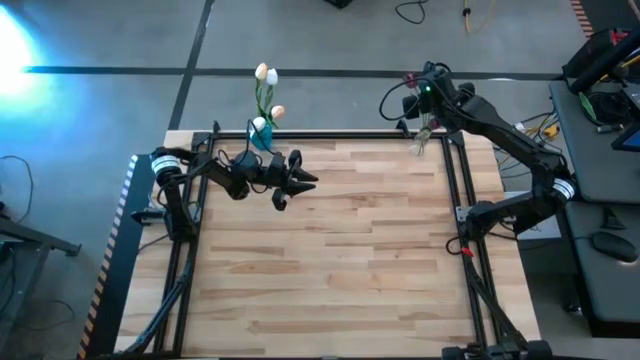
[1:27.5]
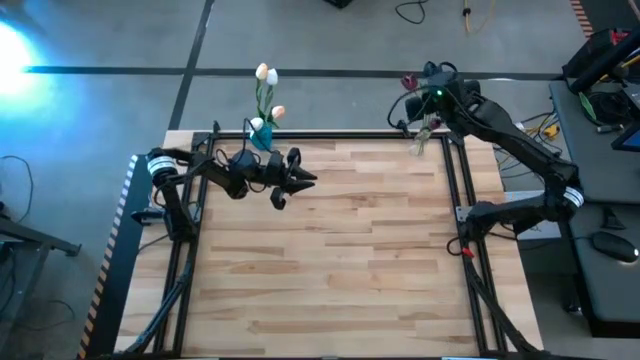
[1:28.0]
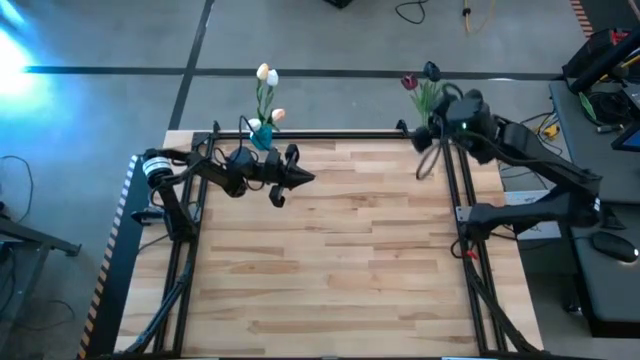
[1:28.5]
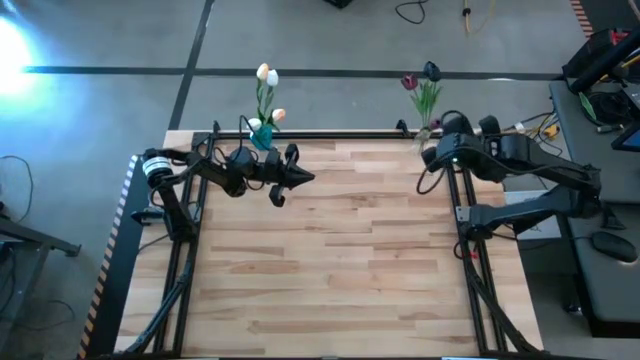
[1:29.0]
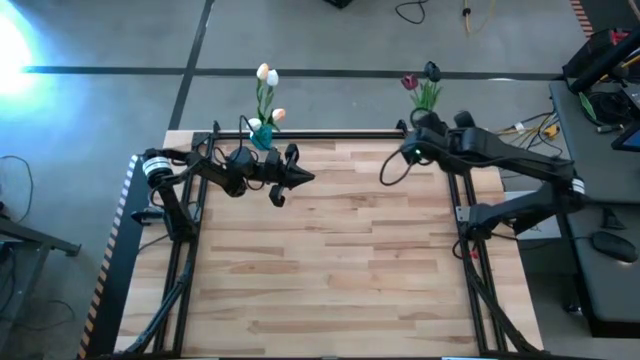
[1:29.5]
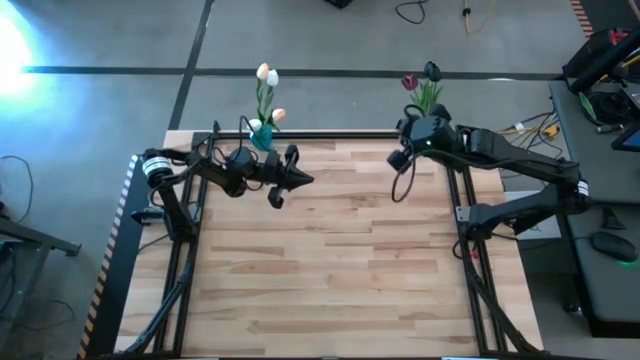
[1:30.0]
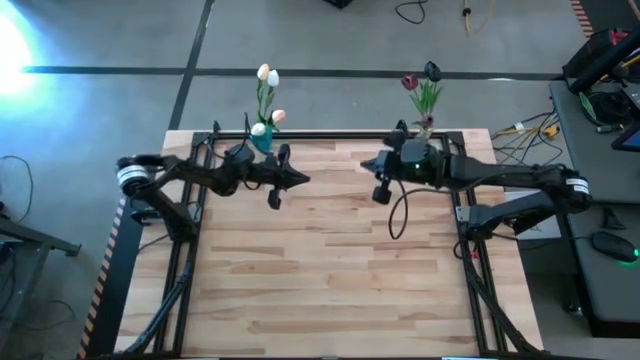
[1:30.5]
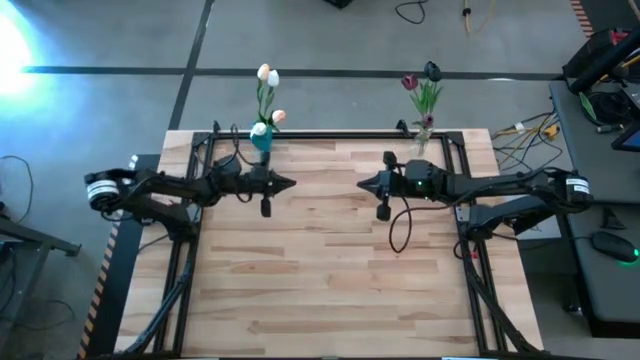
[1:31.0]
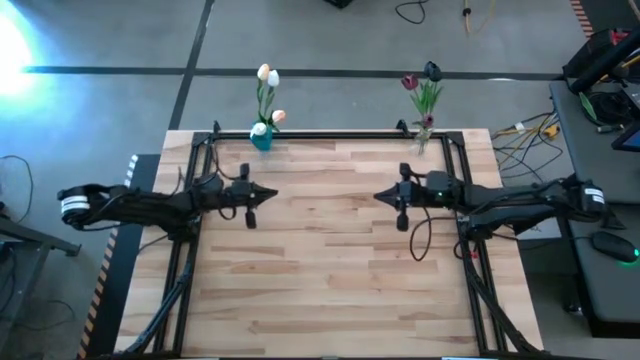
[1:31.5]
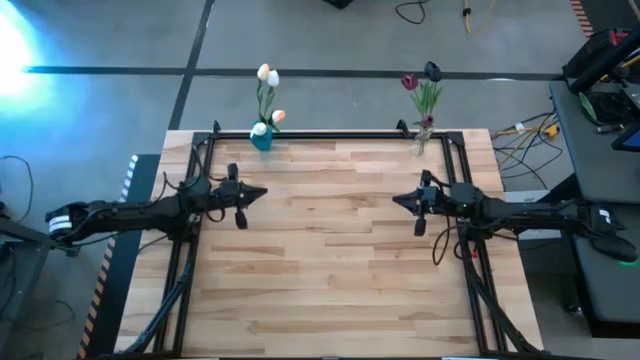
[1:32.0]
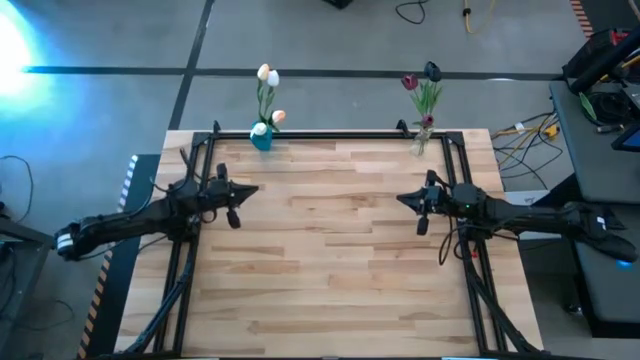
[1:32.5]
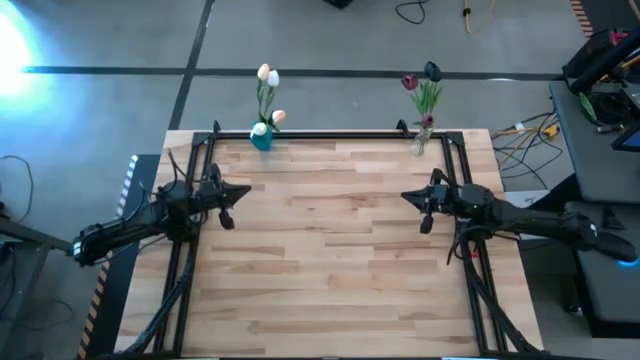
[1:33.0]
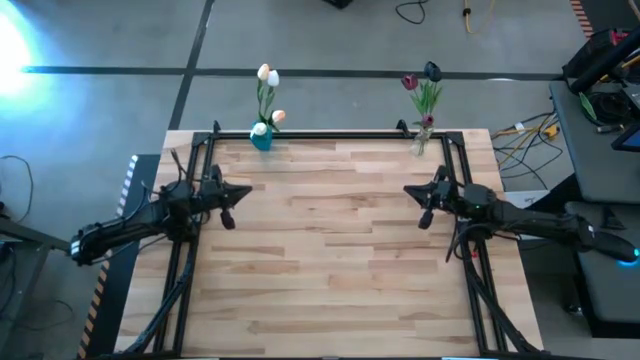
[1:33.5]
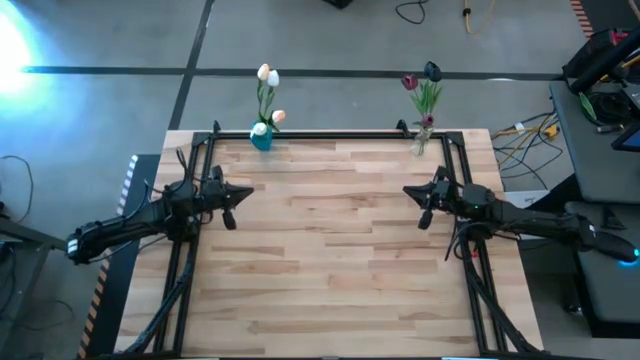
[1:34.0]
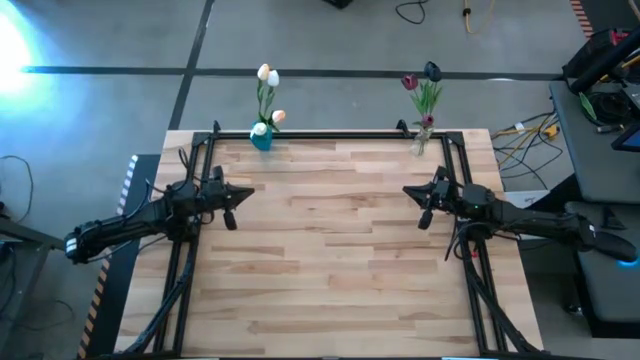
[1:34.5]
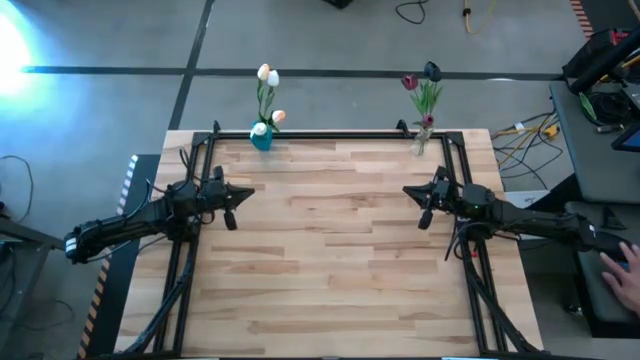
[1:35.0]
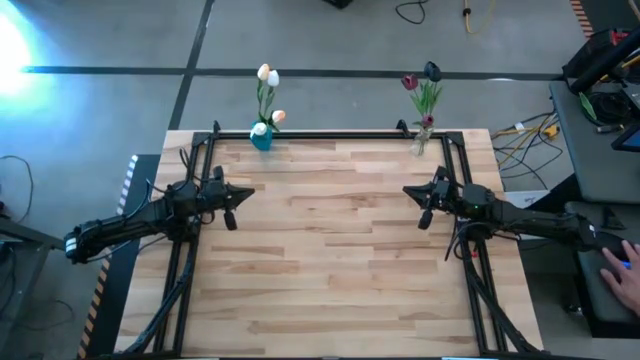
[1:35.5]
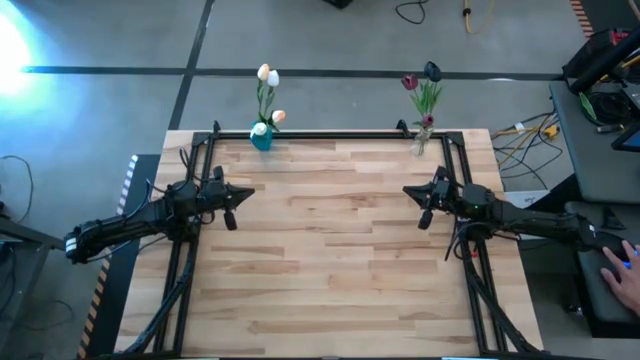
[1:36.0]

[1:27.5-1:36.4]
Task: Sort flowers into vase by color
Return to Home Position

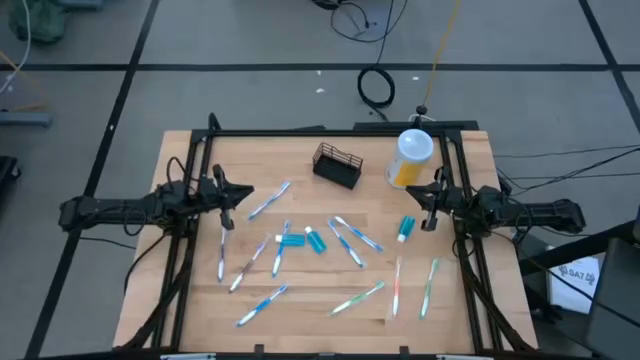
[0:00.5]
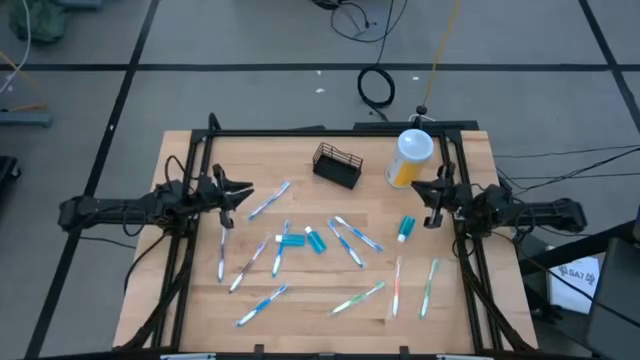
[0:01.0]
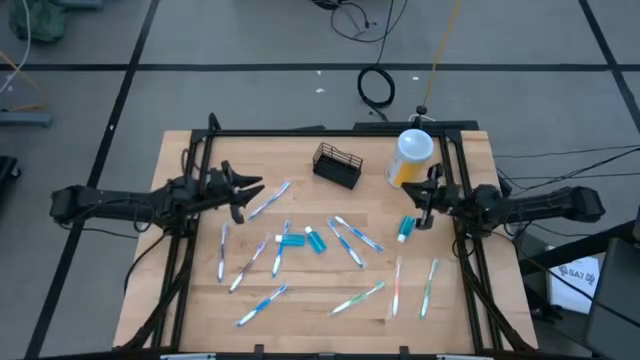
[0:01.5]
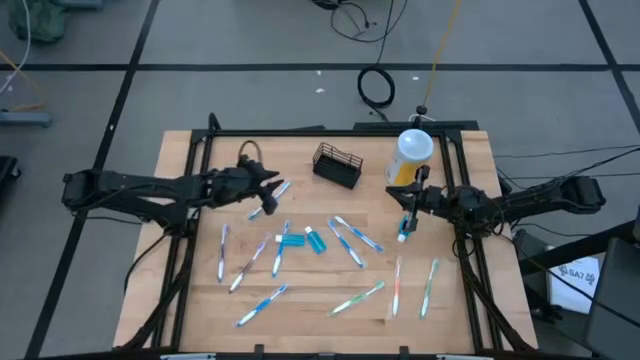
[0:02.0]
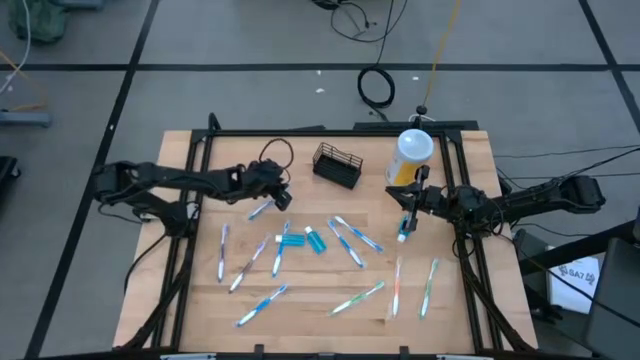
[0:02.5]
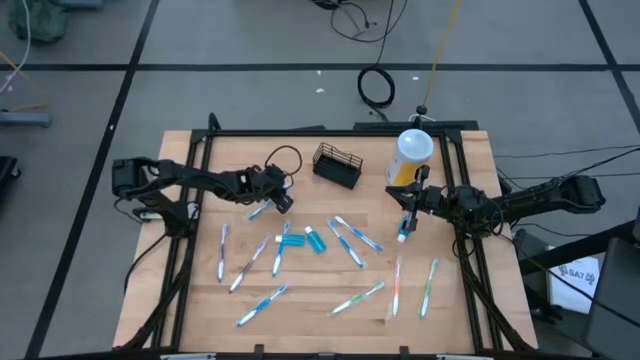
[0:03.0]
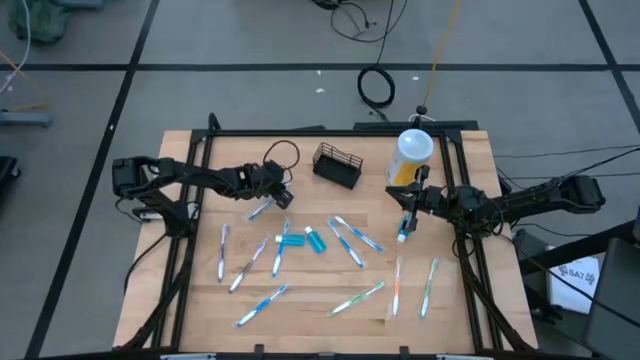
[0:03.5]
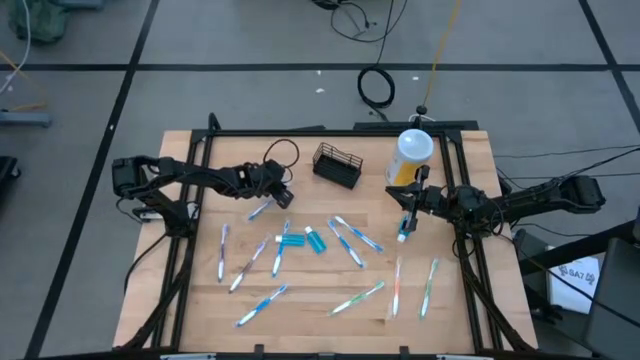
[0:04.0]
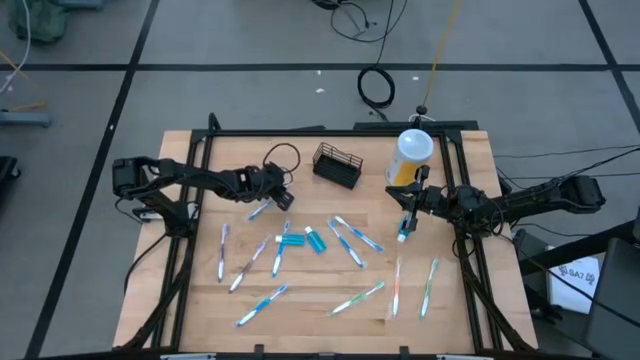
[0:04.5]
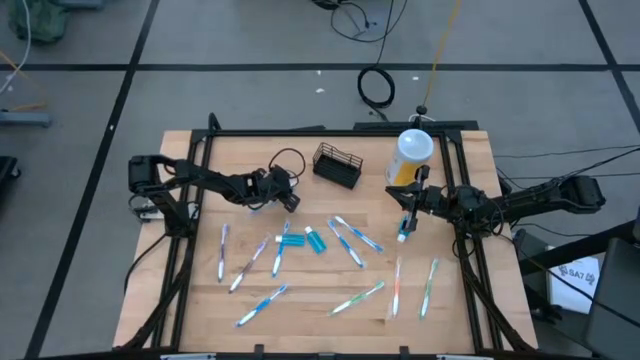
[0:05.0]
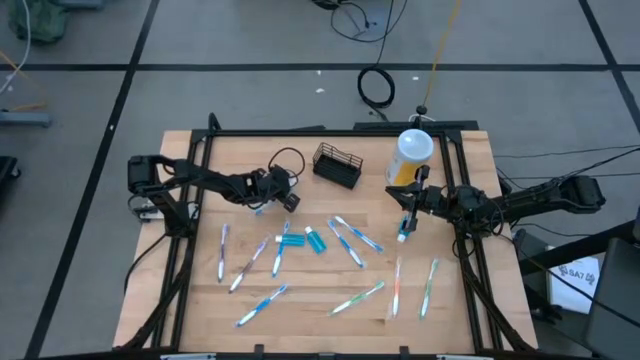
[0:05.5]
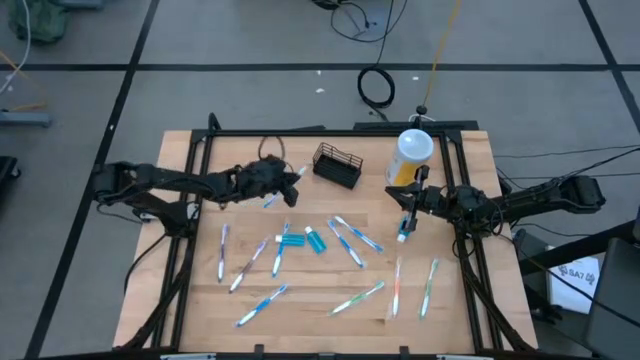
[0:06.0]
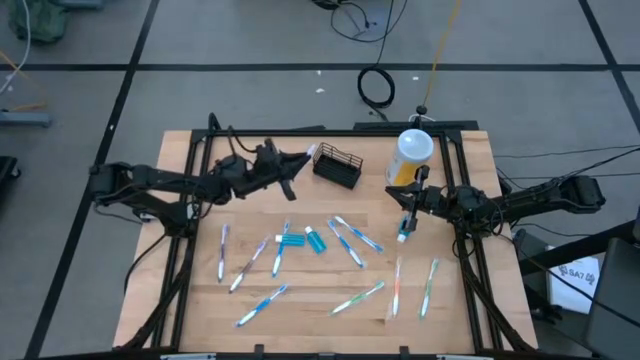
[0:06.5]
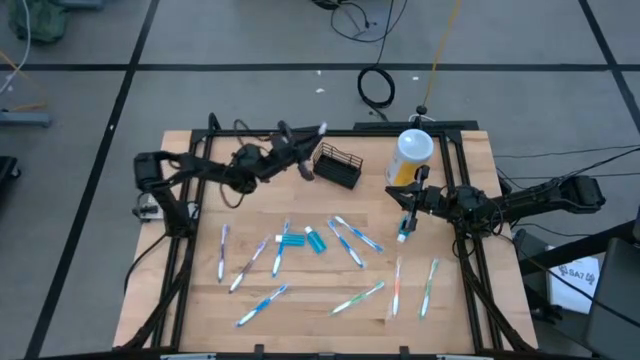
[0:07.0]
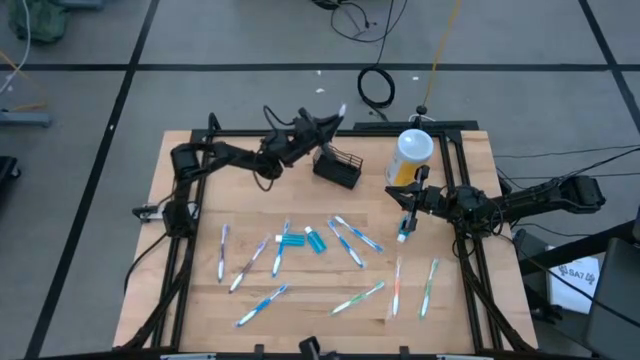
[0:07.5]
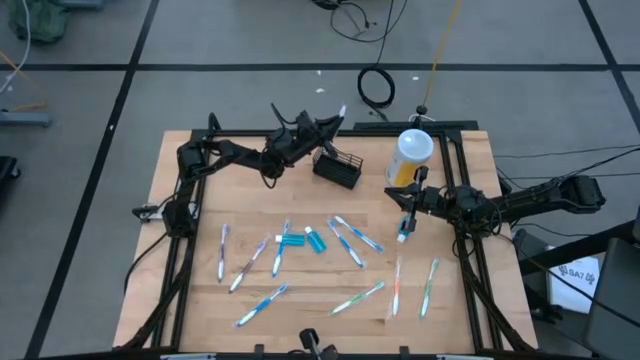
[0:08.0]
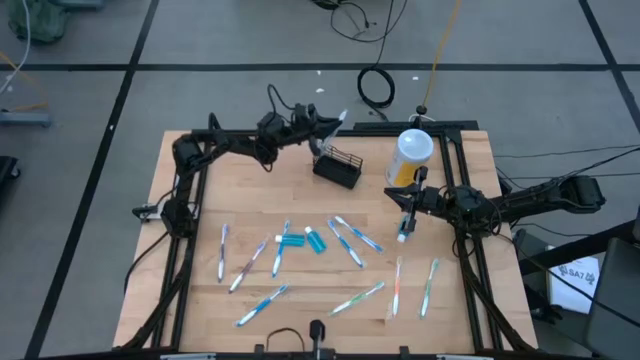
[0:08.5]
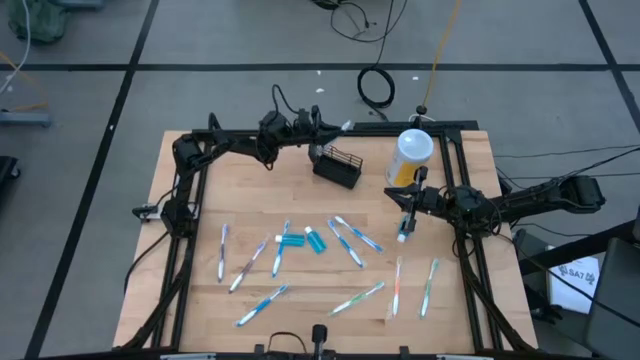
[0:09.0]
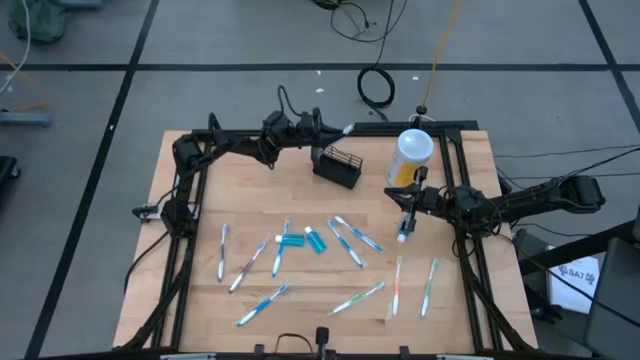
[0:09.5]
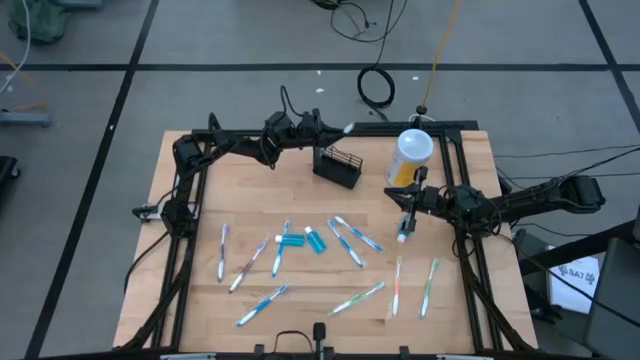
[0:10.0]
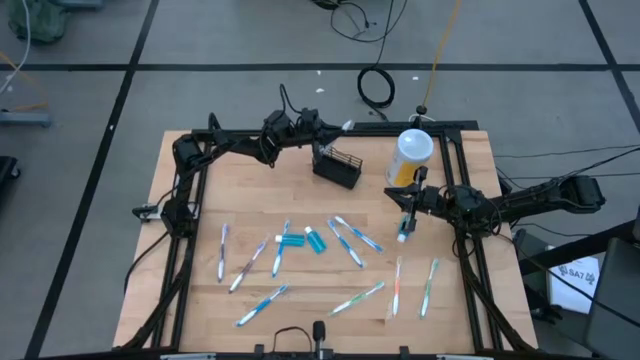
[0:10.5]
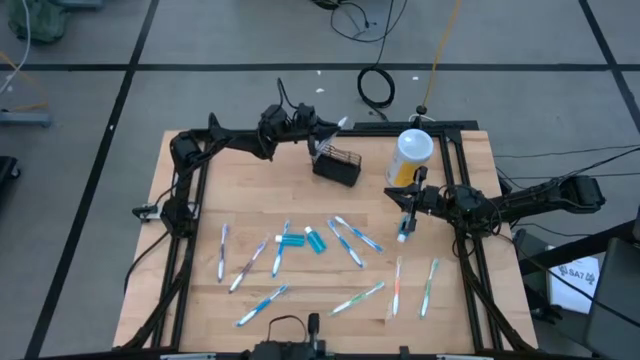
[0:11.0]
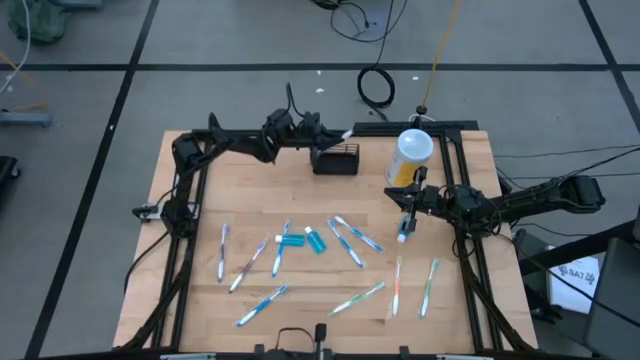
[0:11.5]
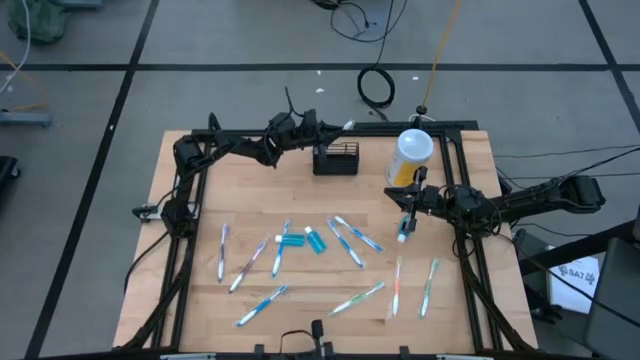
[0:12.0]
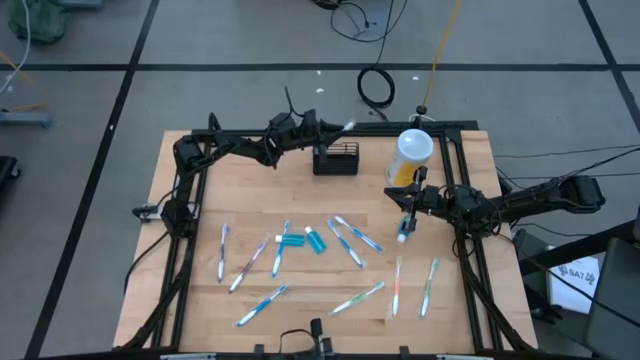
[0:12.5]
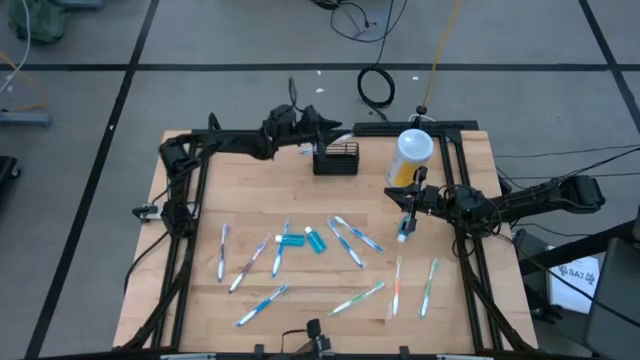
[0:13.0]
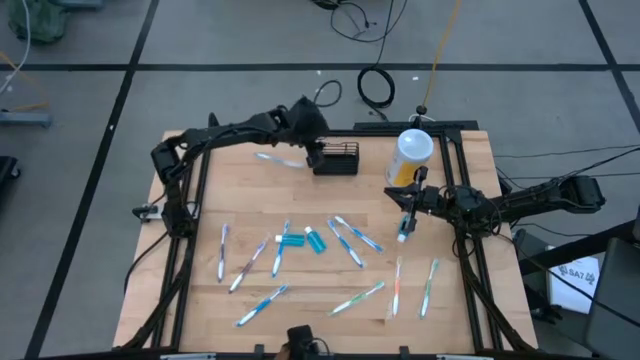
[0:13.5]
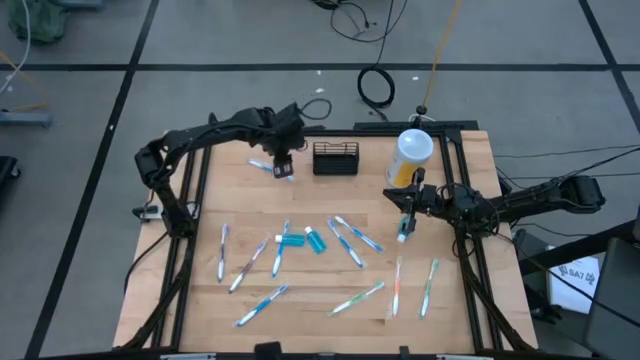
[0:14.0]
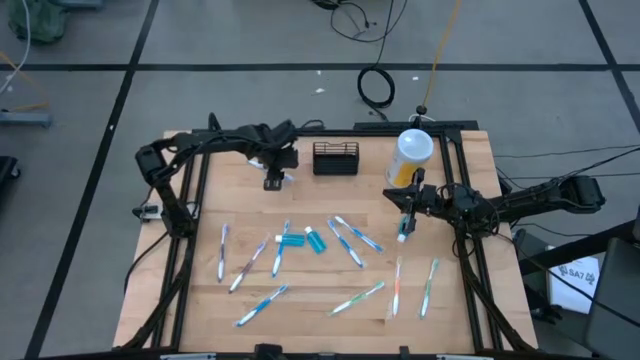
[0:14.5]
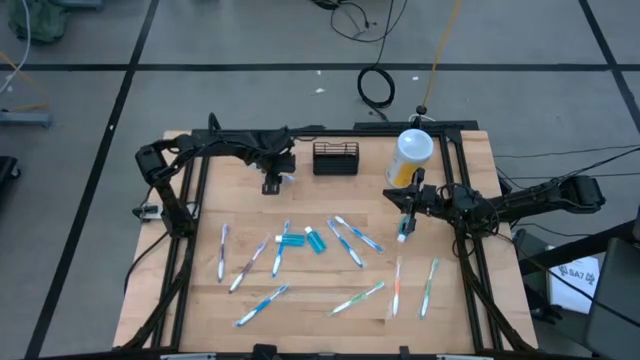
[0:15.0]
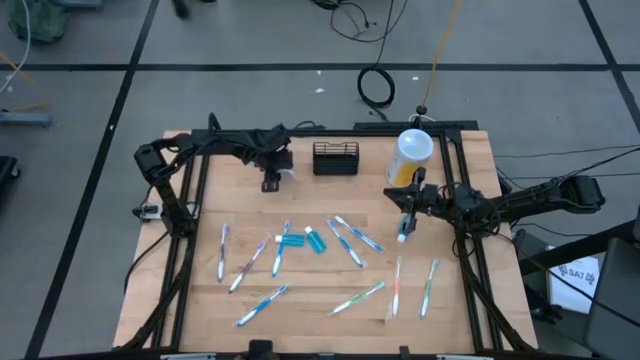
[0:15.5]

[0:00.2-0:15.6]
Task: Pick & Place toothbrushing station
Put the blue toothbrush into the black wire organizer
